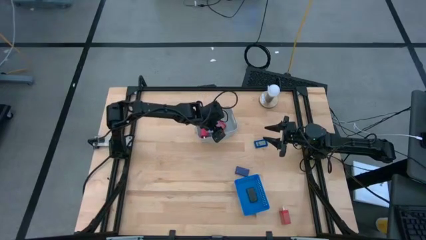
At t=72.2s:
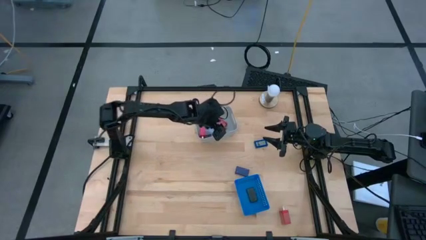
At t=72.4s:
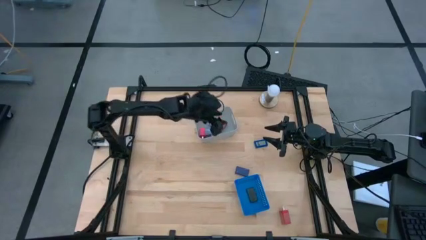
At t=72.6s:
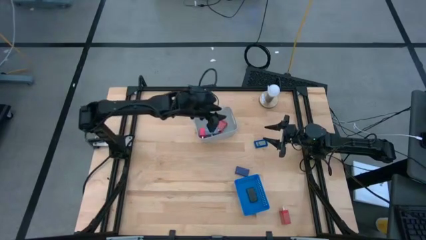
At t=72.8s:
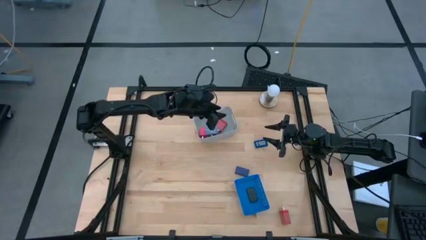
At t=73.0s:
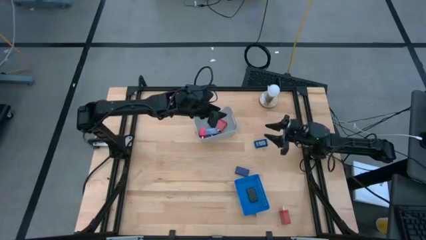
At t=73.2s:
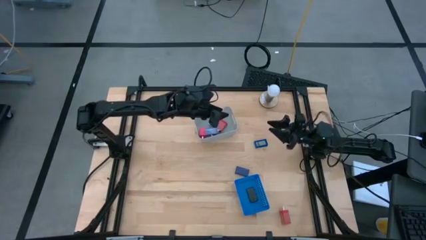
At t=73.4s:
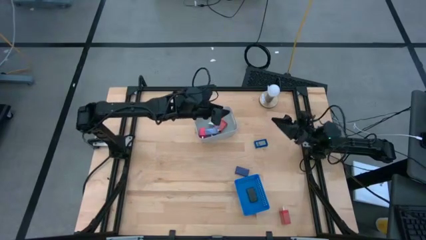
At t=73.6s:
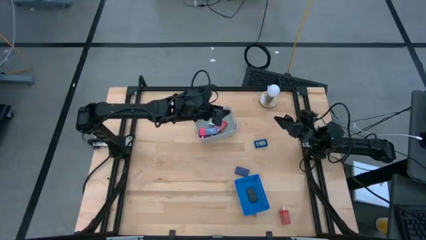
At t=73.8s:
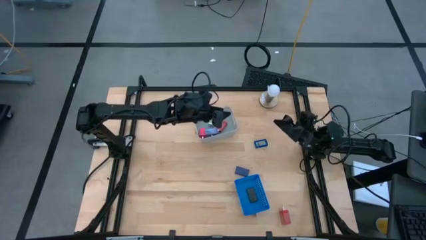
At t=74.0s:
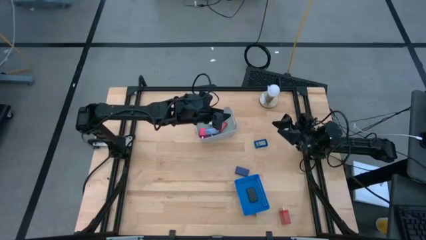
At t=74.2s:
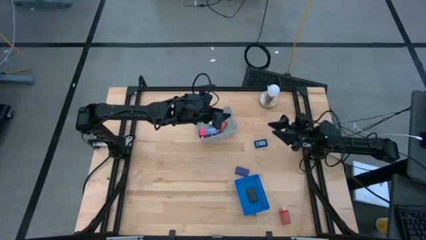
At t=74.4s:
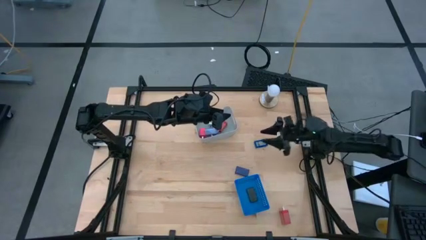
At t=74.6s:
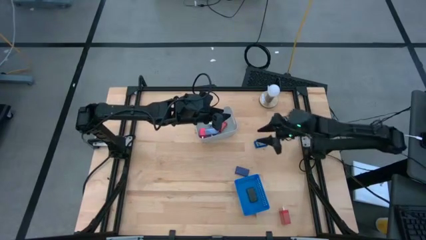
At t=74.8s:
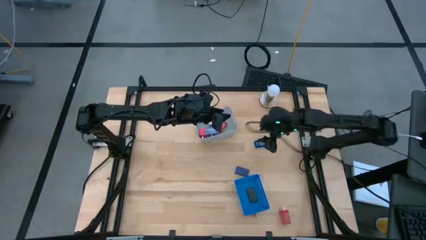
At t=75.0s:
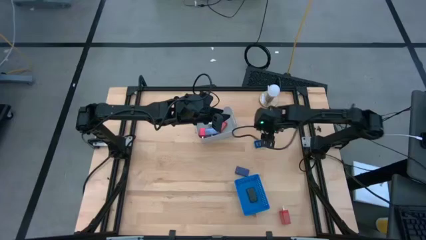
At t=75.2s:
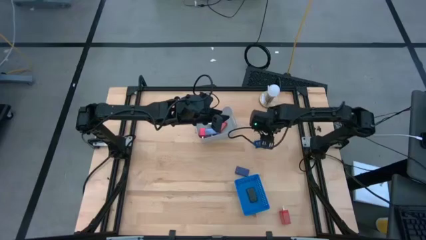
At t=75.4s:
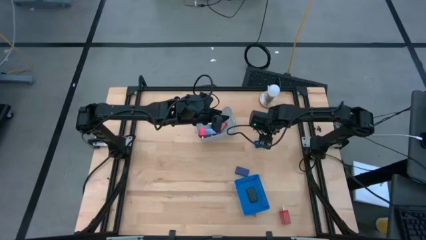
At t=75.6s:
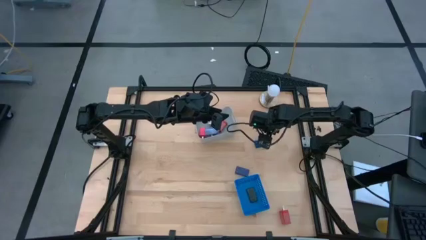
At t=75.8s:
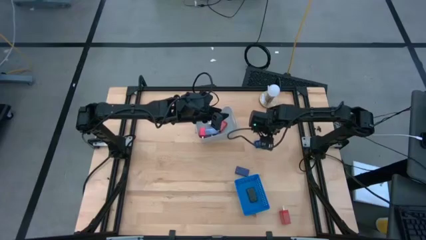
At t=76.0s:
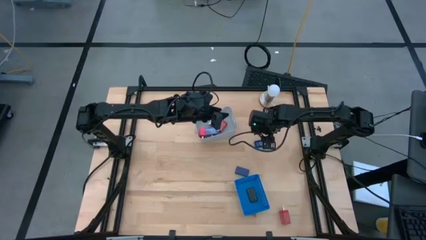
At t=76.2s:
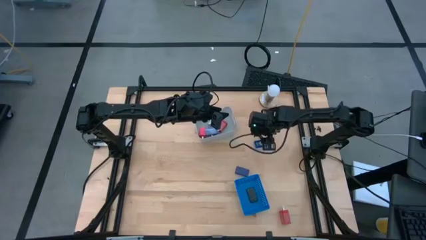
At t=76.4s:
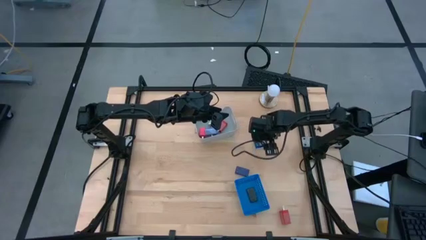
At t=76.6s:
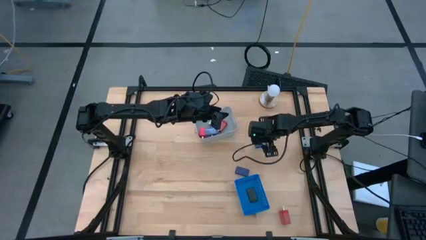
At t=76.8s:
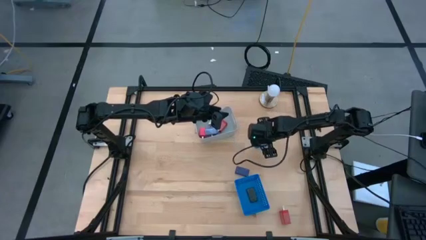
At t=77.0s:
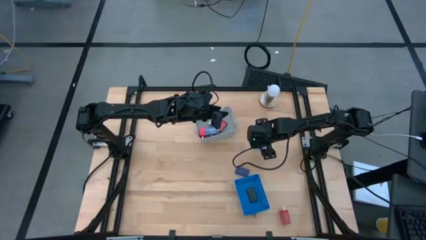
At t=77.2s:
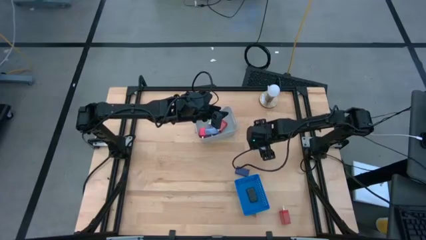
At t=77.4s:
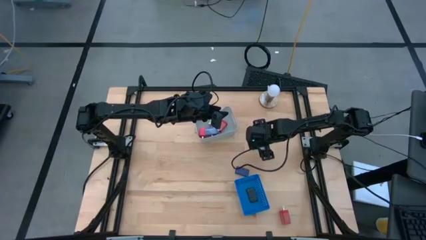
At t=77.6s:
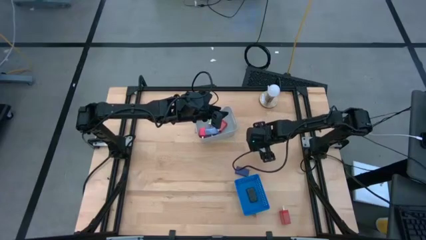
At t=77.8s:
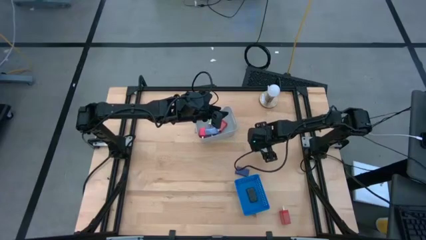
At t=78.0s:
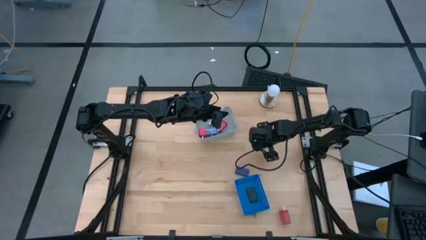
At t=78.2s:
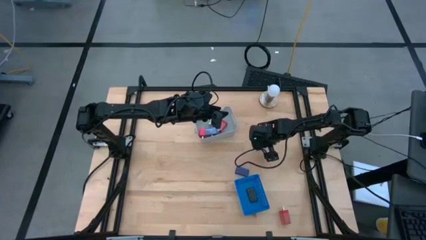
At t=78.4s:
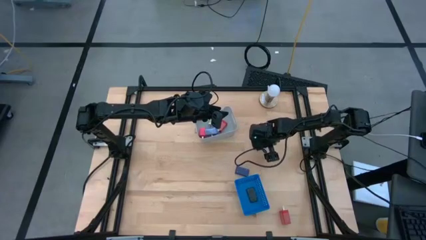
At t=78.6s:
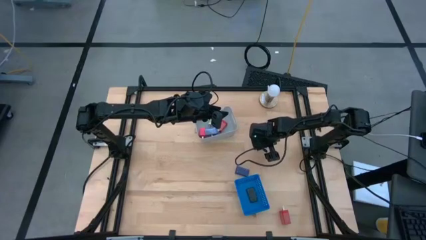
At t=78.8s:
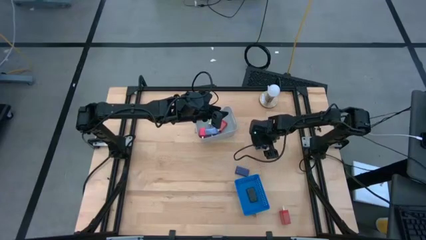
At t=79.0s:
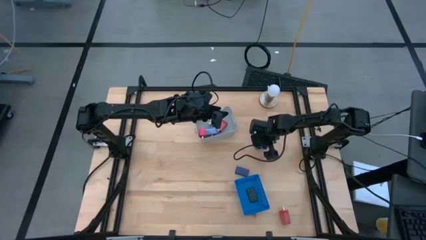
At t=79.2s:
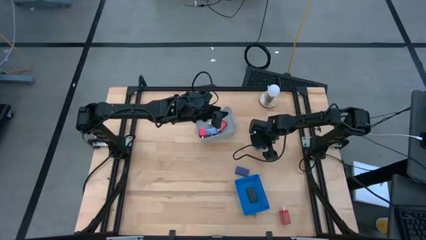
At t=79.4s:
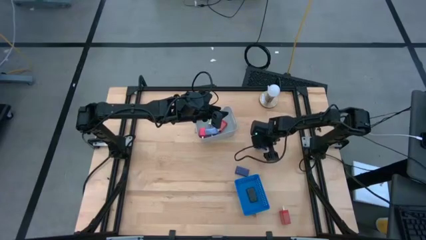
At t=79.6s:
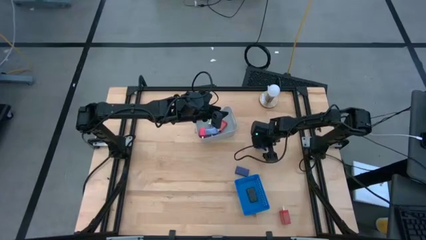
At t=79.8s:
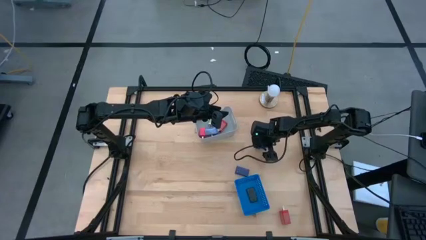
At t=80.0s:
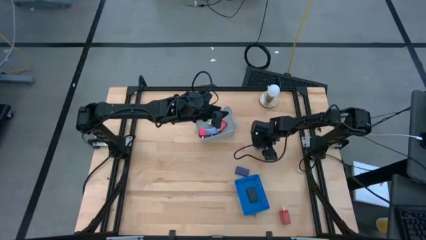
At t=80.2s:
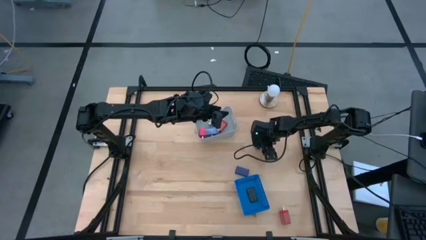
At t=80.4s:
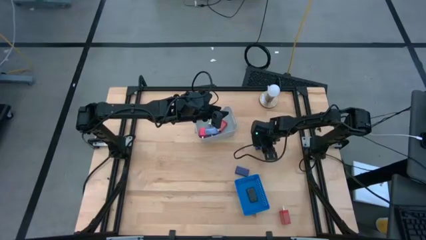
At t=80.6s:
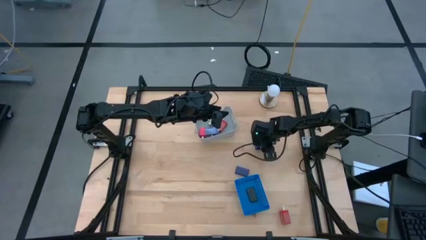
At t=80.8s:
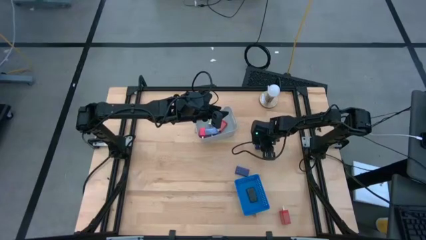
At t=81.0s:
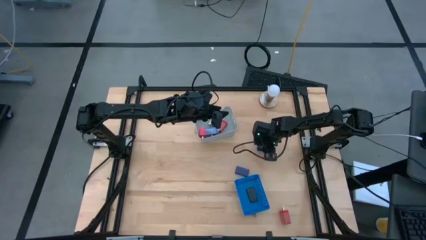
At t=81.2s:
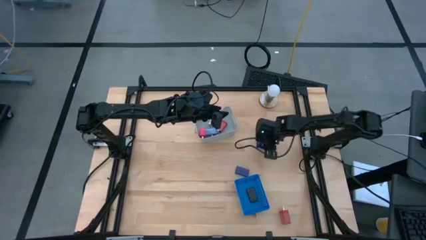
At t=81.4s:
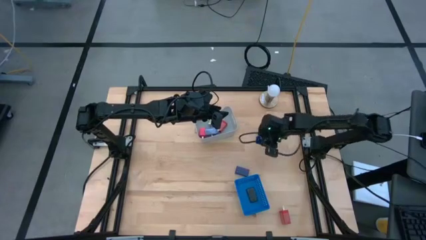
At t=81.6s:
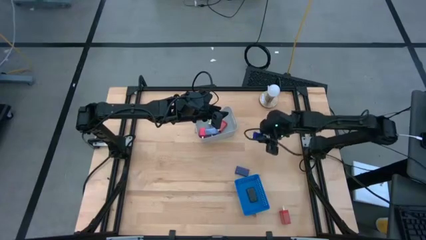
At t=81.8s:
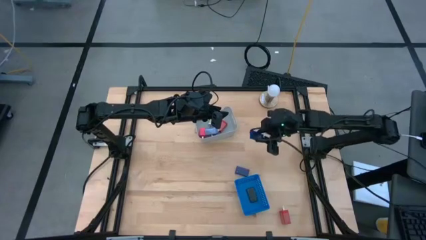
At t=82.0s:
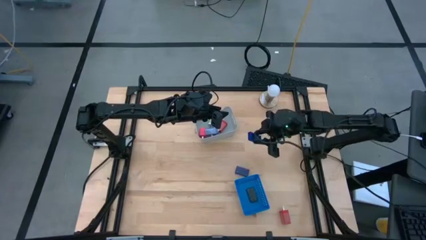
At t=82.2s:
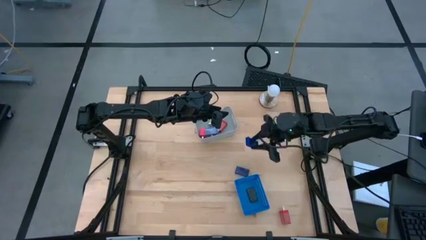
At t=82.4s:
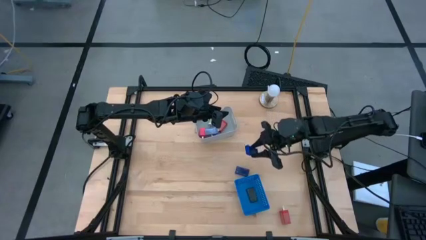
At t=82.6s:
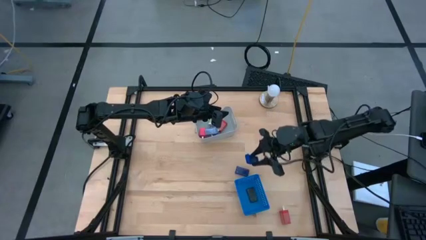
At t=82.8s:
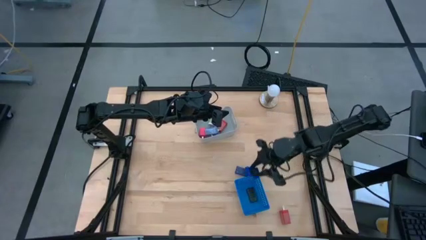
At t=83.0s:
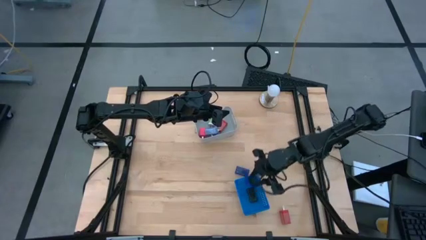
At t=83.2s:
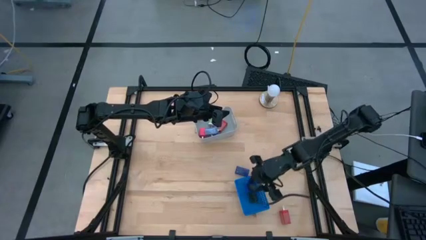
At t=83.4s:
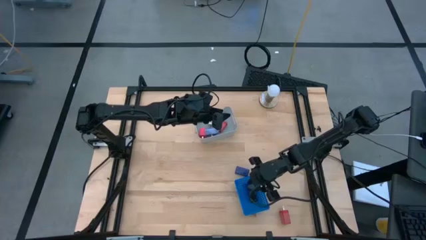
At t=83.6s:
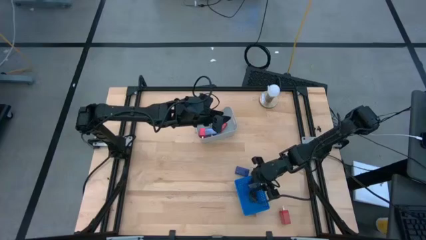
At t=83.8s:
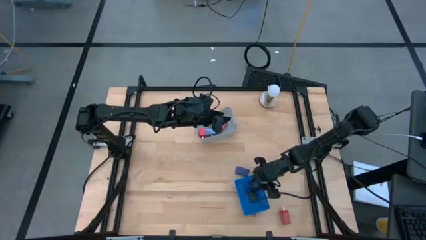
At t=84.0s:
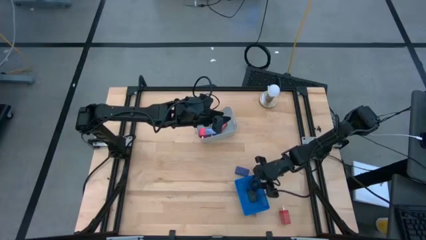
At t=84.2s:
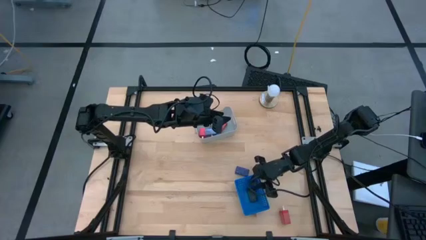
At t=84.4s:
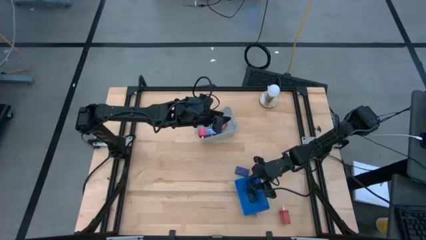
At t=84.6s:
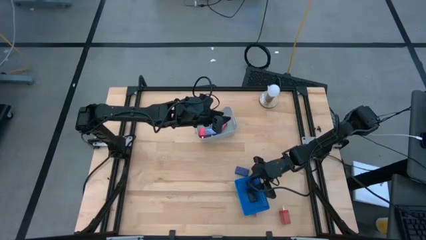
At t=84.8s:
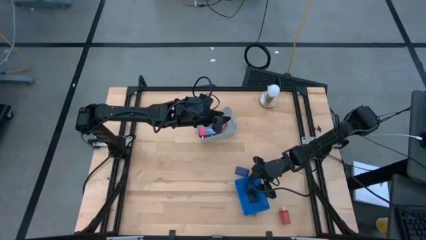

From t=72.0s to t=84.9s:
Task: Pick & Place Office items
Put the blue timer into the blue bin

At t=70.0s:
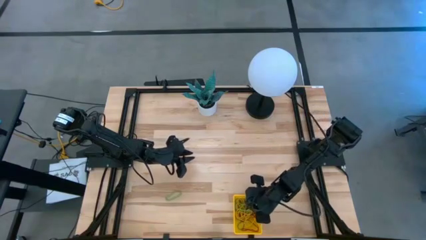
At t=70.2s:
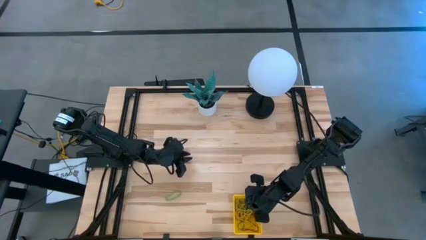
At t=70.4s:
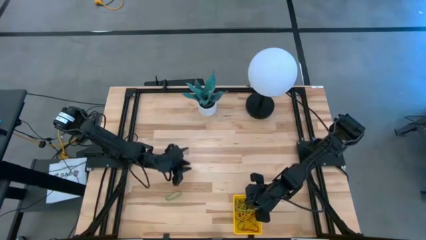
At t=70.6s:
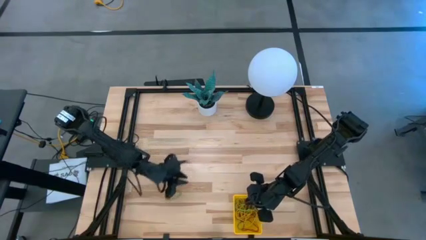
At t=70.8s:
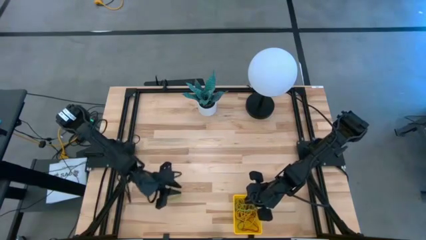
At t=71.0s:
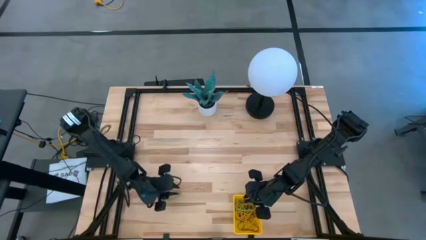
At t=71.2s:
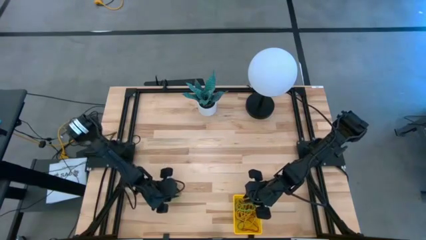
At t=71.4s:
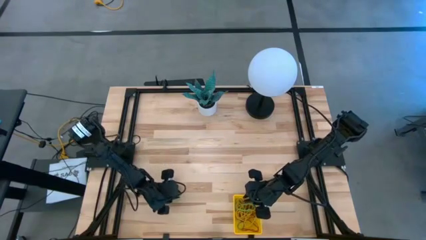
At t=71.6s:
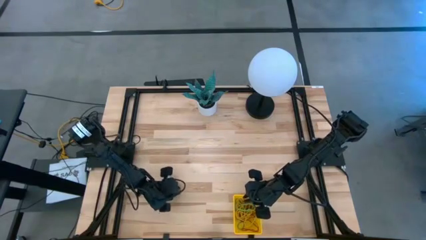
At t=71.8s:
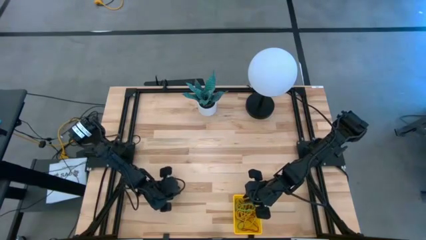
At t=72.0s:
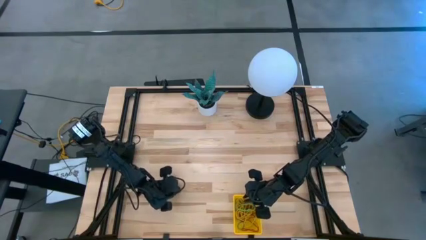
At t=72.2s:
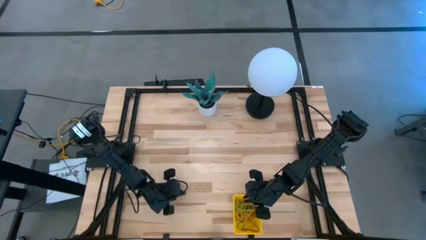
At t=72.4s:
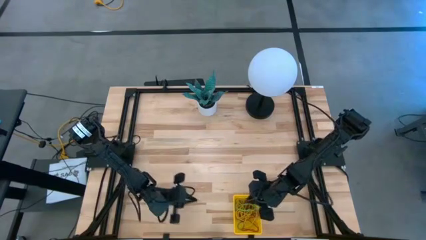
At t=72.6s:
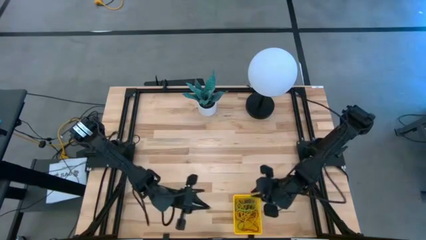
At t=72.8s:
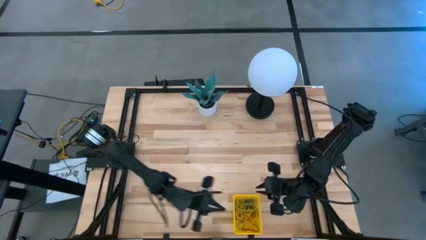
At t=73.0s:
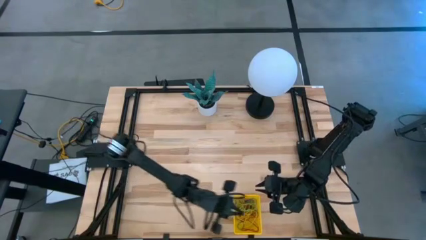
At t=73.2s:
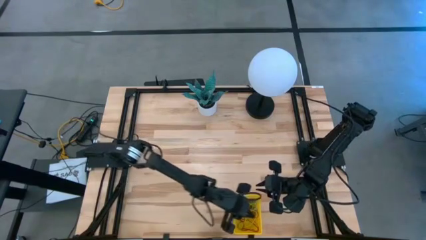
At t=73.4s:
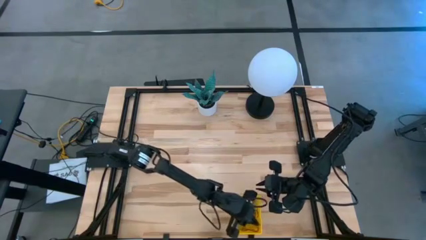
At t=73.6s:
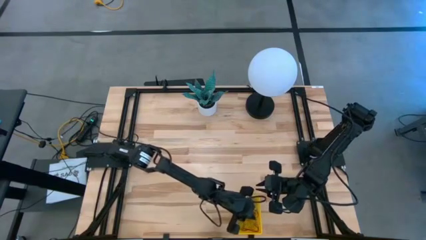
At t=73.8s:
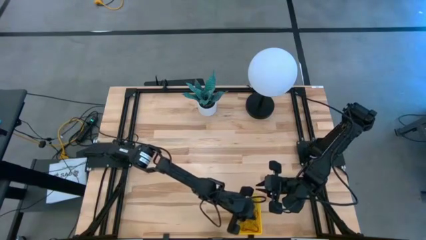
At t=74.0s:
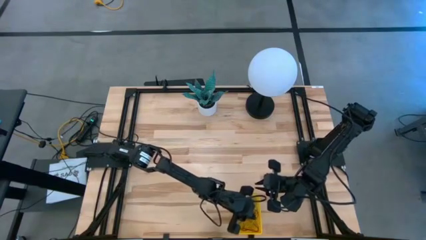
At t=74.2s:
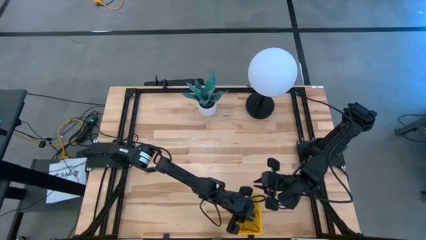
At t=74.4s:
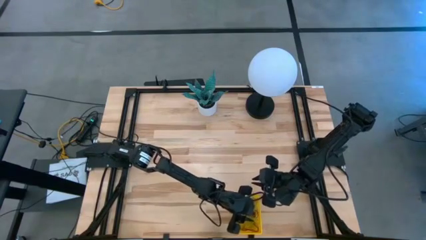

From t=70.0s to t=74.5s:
Task: Pick and place rubber bands into bin
Put the green rubber band into the yellow basket
